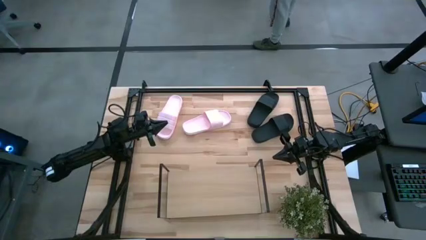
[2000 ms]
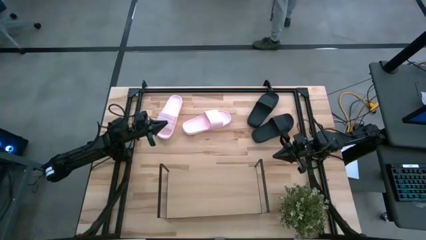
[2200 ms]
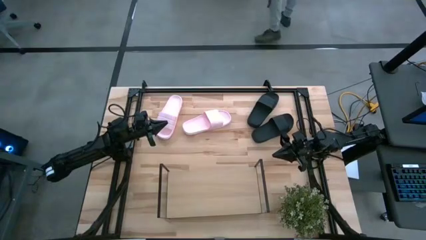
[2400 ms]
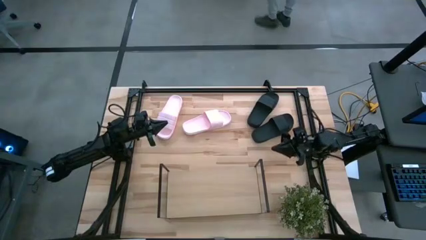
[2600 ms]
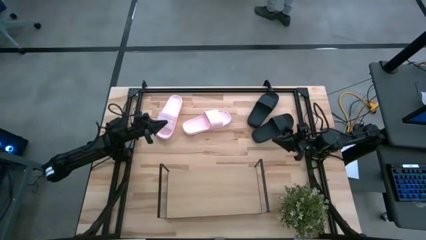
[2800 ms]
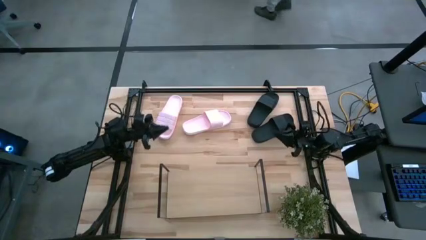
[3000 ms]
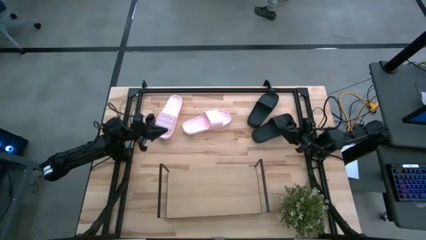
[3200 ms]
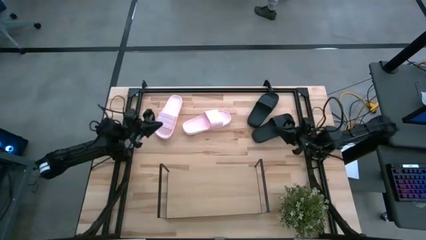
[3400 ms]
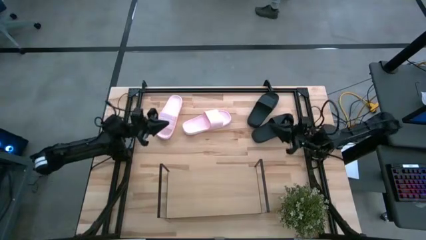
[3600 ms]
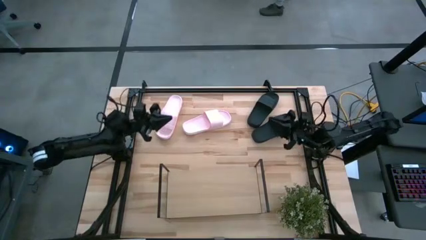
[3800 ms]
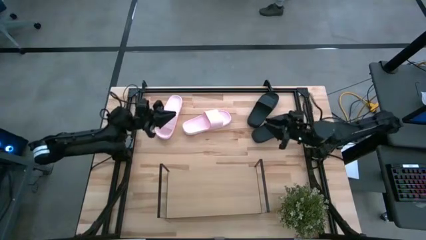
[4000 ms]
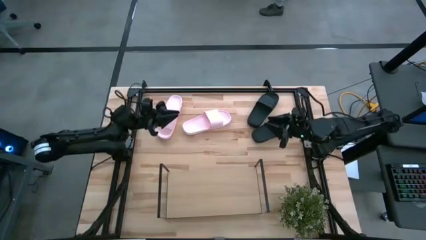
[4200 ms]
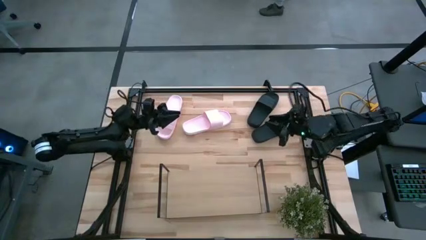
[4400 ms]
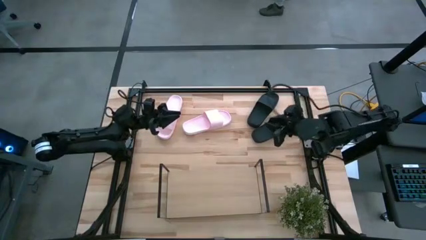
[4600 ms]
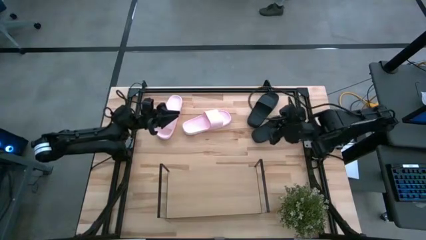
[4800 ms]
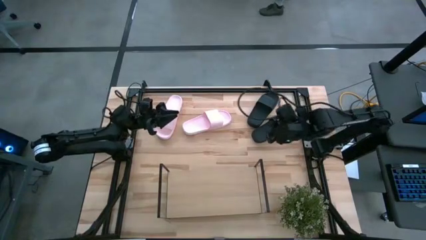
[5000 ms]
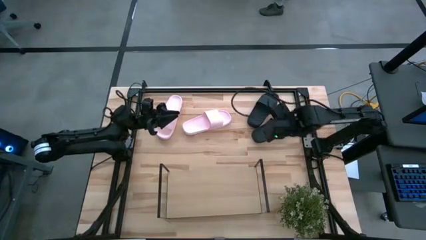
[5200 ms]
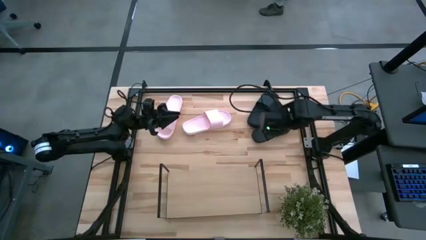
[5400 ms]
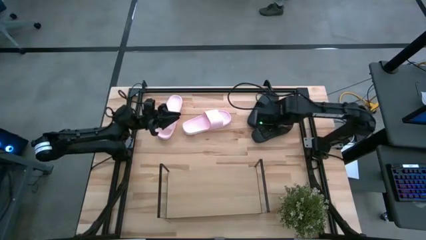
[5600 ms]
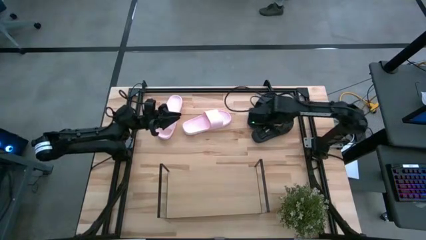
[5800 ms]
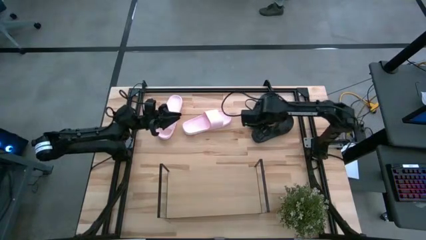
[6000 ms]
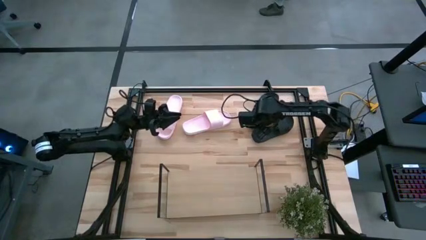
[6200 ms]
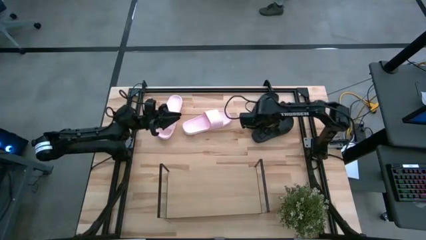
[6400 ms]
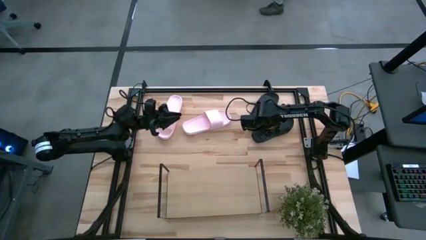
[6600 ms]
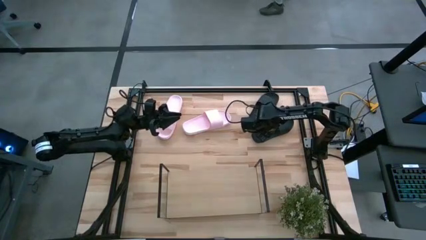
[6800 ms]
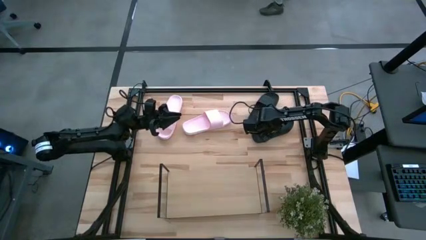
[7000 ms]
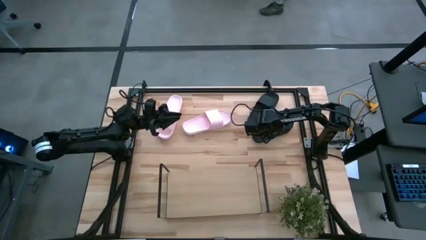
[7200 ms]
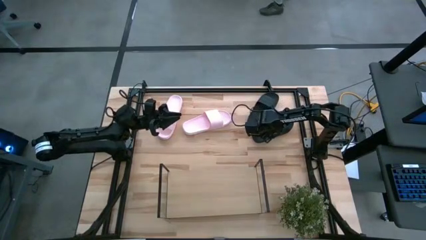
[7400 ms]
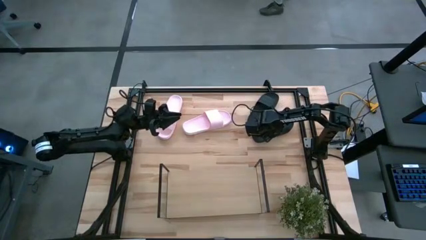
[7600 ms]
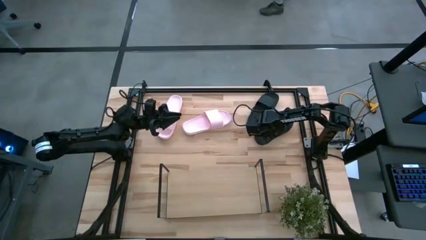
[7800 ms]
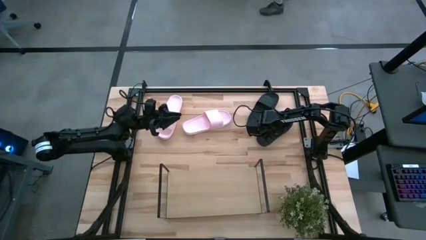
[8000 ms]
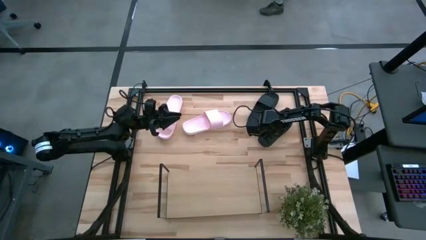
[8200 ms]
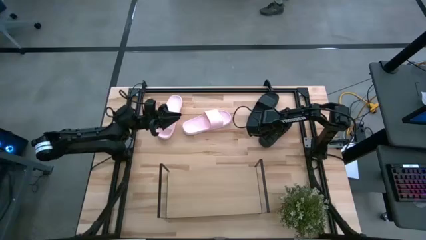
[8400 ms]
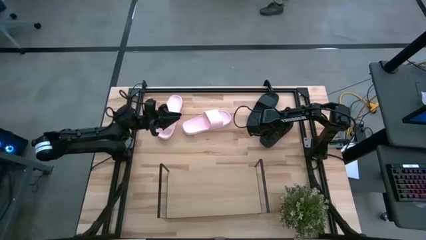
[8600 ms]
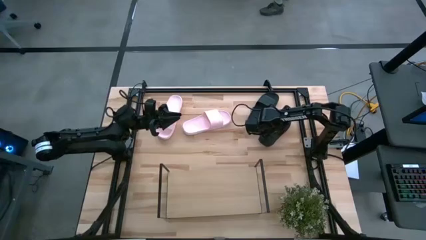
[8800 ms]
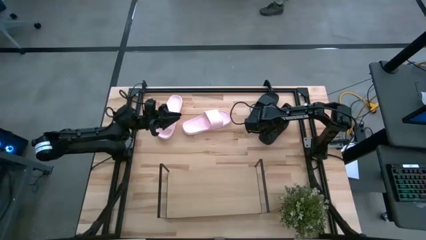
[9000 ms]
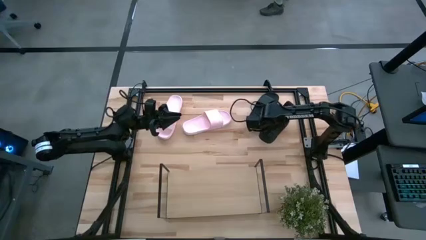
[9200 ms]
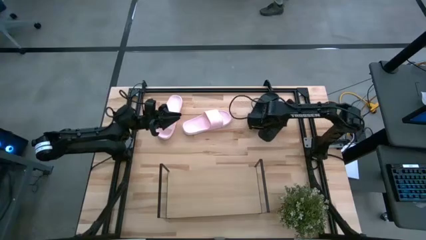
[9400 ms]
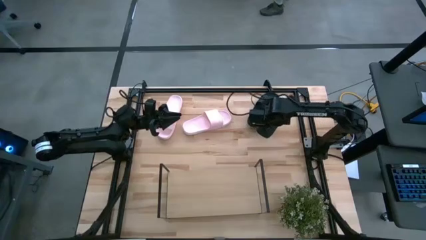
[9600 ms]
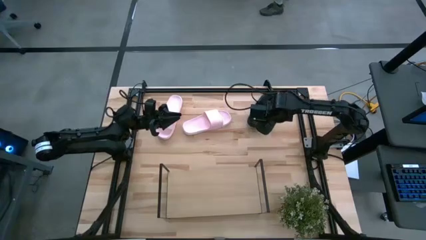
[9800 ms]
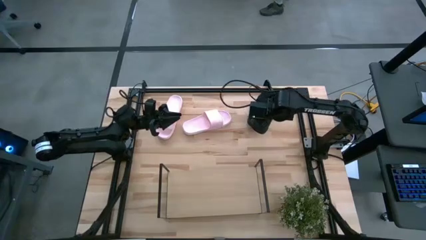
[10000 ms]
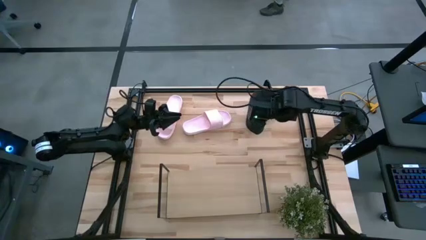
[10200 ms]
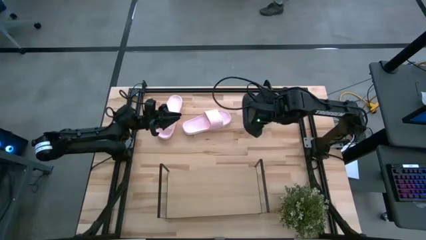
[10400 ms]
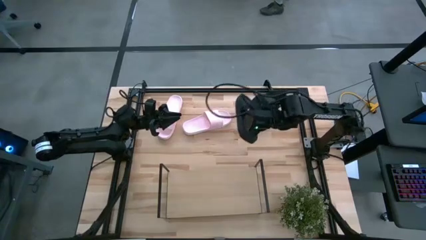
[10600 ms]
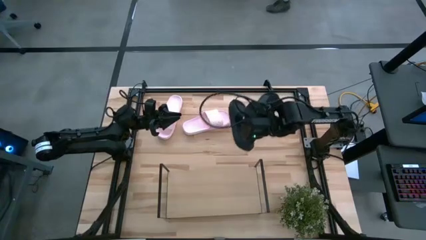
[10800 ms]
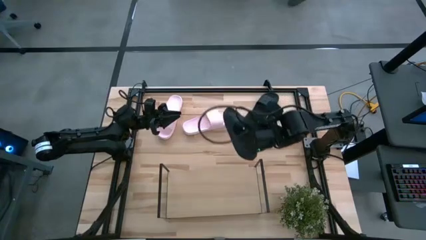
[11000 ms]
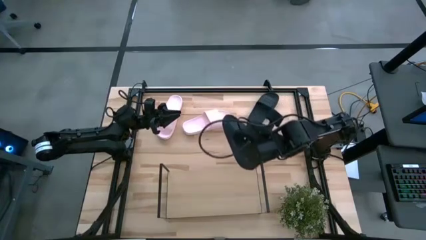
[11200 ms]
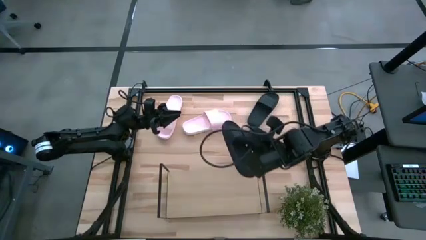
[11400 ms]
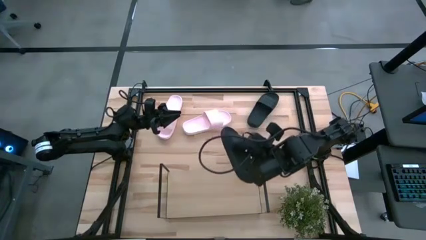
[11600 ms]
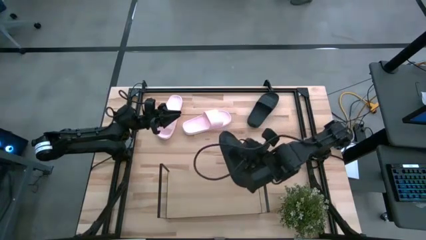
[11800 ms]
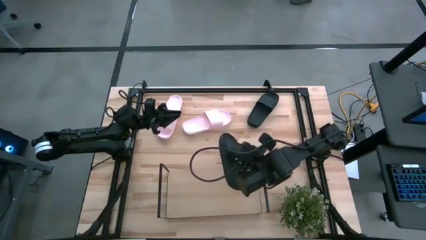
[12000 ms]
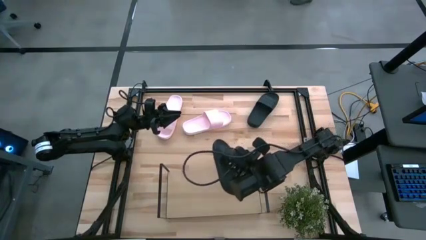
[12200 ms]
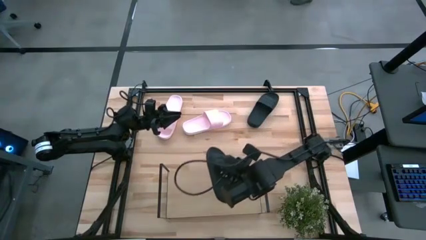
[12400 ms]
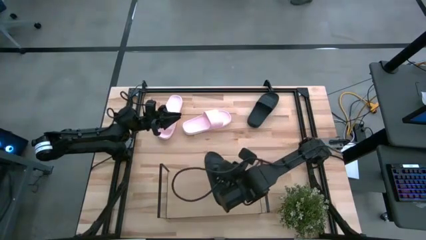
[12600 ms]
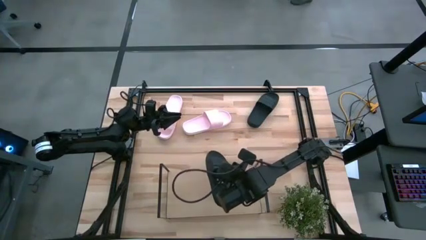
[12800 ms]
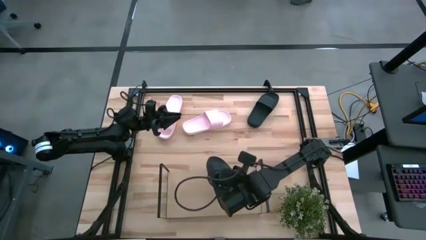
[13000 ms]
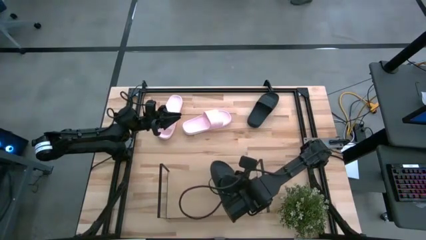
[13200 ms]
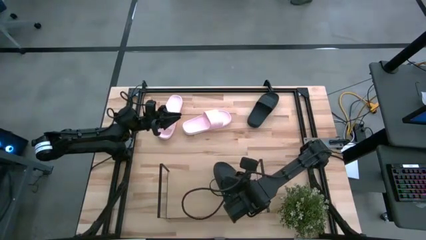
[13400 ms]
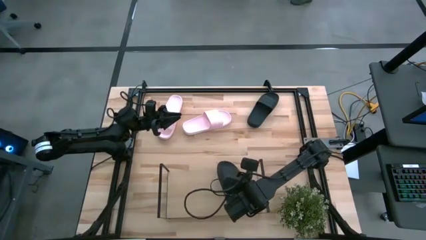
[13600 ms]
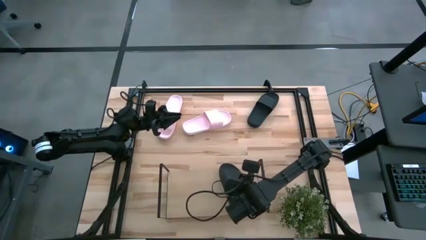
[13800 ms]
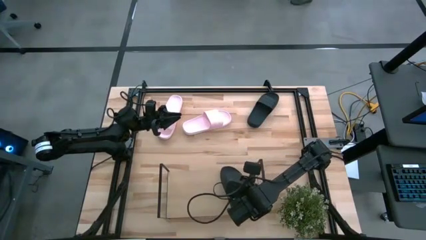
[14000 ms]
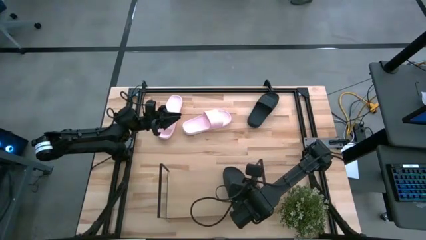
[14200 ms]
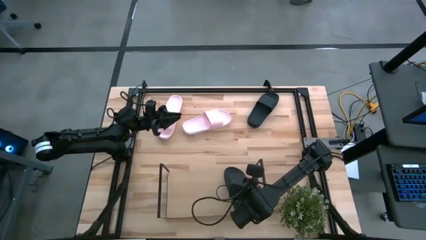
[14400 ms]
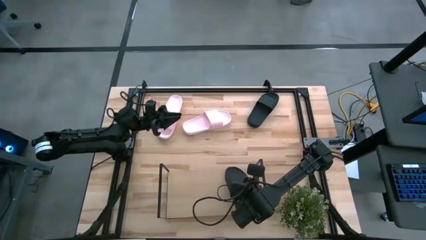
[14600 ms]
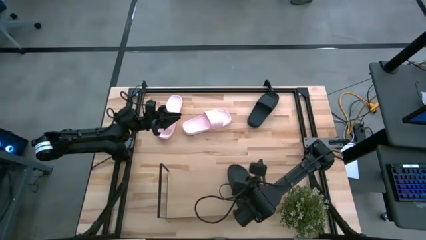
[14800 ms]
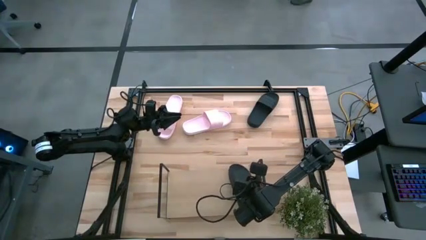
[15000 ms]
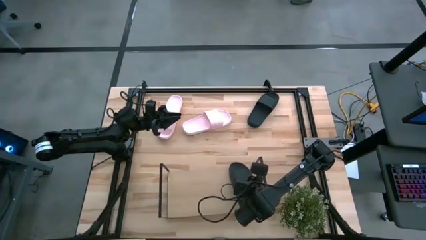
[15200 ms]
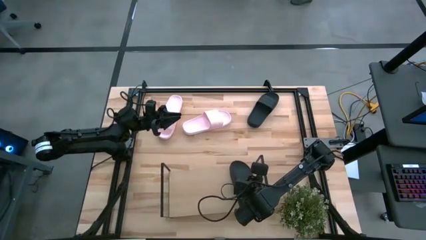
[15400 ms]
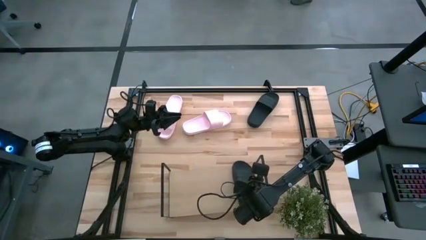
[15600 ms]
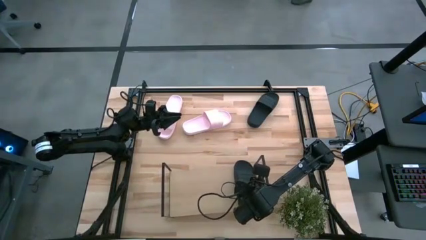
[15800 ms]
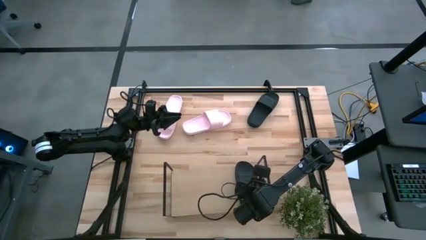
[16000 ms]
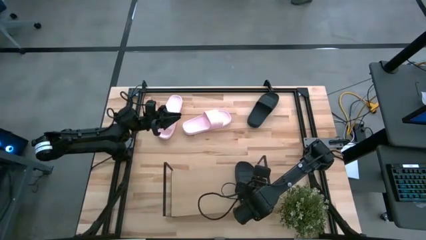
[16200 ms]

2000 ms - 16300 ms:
Task: Pick and place slides into the shelf
Put the right black slide on the shelf
